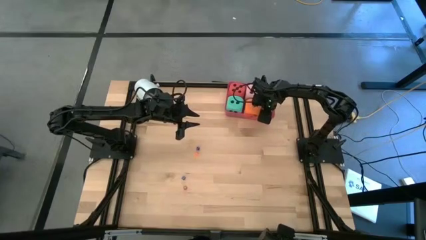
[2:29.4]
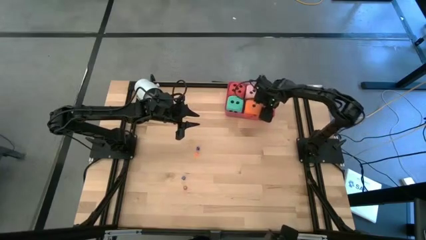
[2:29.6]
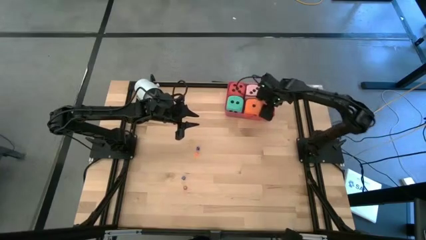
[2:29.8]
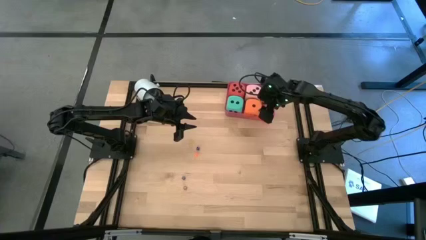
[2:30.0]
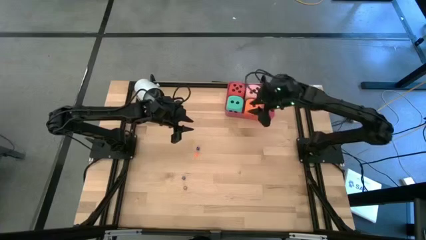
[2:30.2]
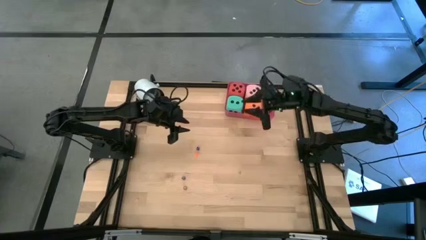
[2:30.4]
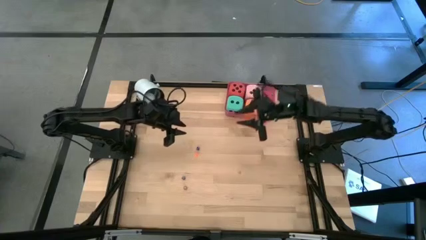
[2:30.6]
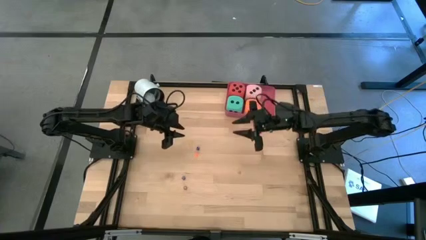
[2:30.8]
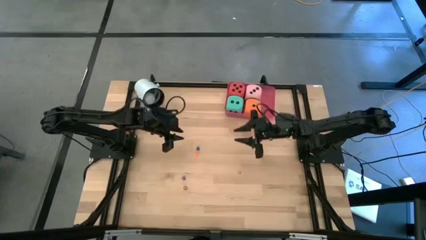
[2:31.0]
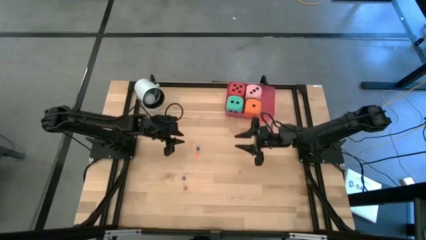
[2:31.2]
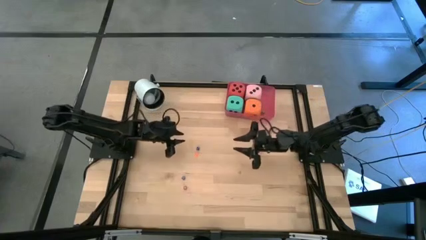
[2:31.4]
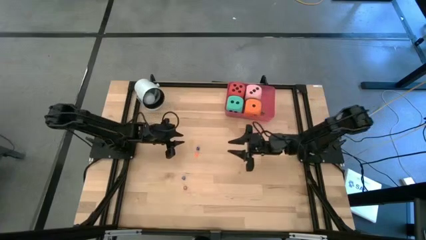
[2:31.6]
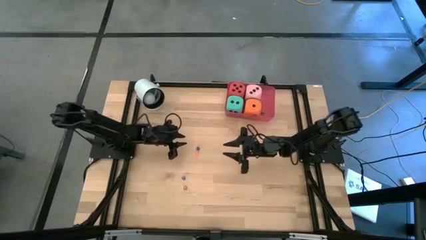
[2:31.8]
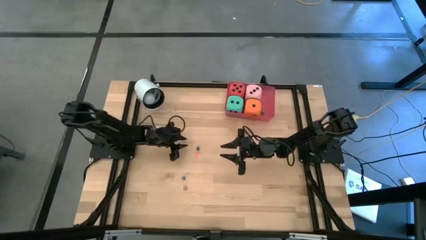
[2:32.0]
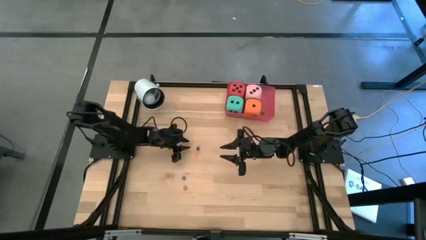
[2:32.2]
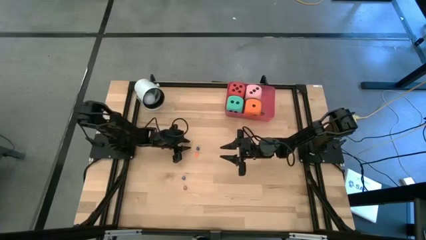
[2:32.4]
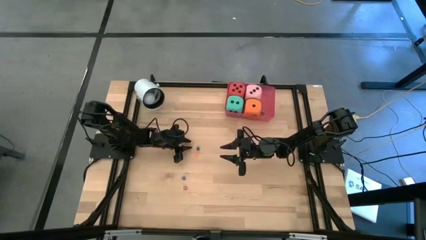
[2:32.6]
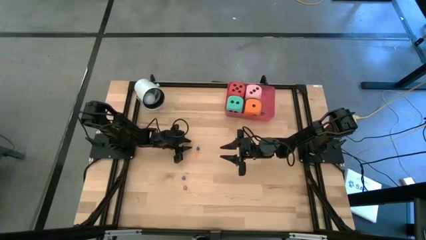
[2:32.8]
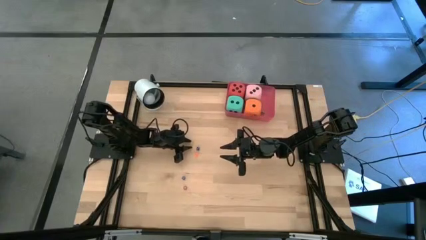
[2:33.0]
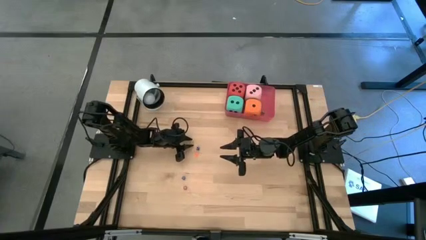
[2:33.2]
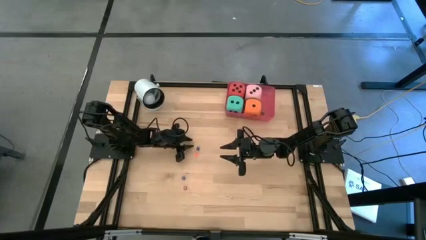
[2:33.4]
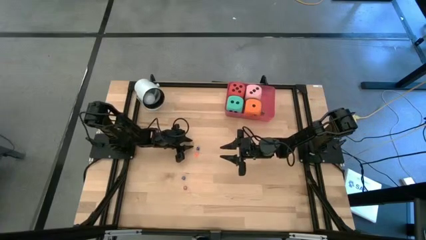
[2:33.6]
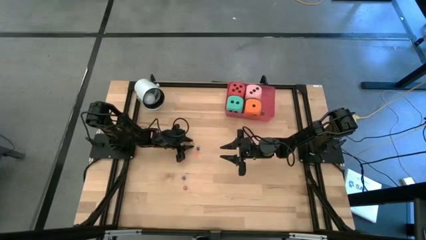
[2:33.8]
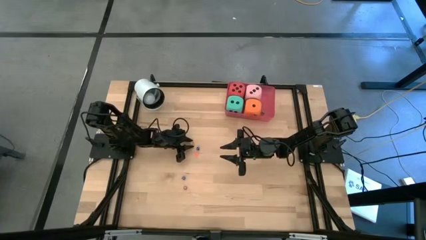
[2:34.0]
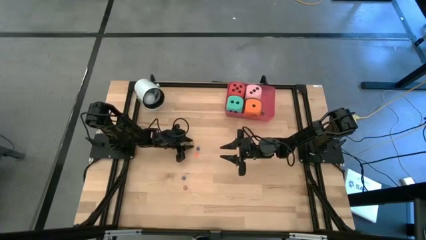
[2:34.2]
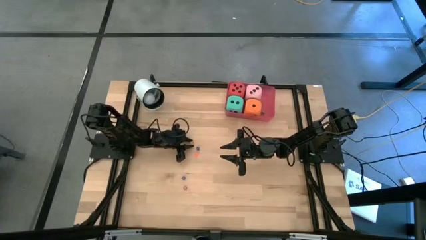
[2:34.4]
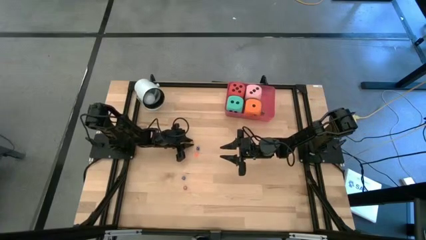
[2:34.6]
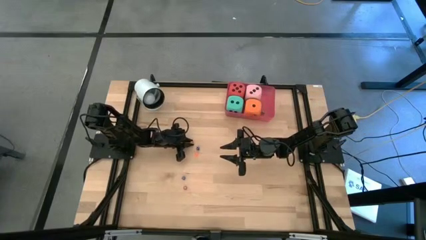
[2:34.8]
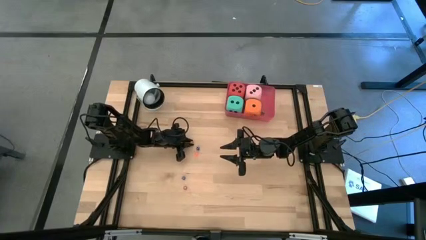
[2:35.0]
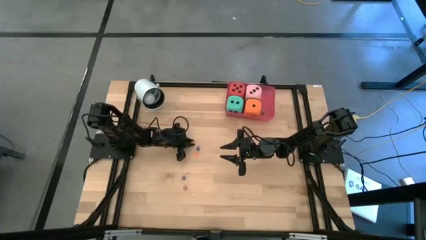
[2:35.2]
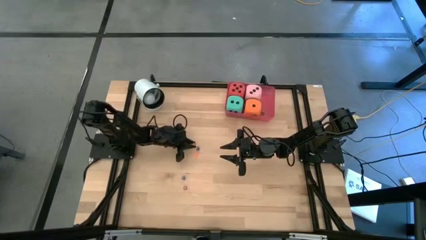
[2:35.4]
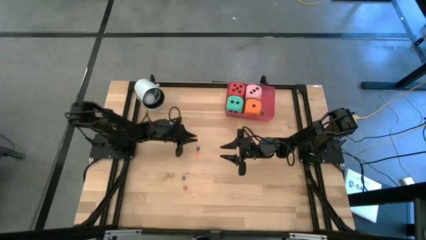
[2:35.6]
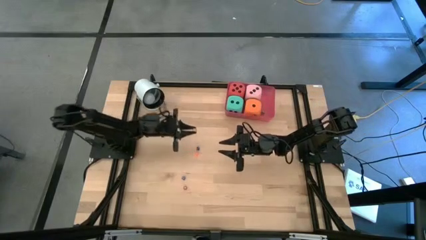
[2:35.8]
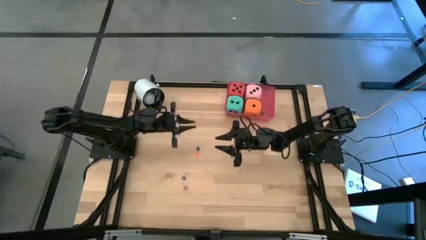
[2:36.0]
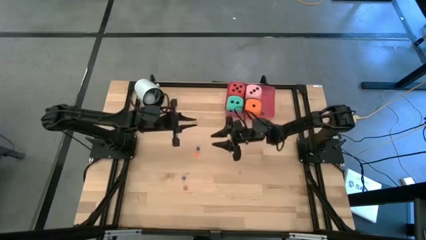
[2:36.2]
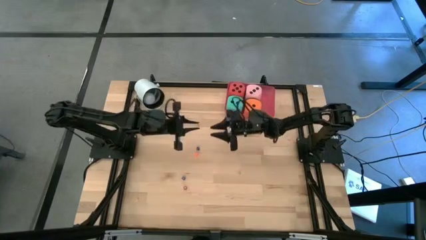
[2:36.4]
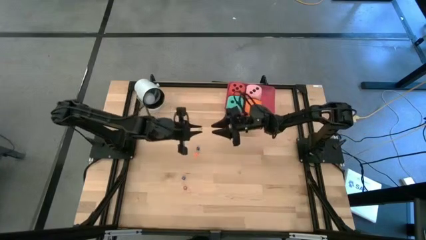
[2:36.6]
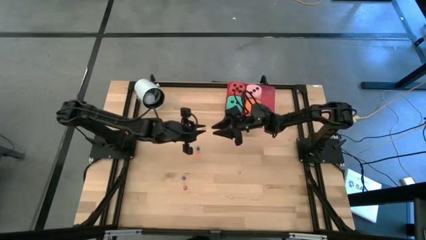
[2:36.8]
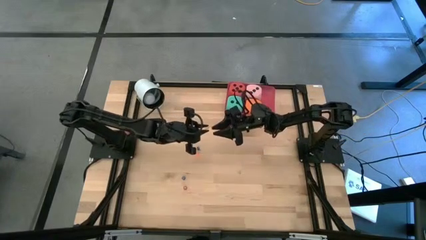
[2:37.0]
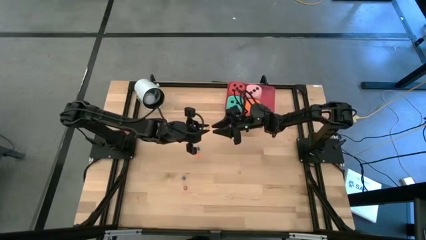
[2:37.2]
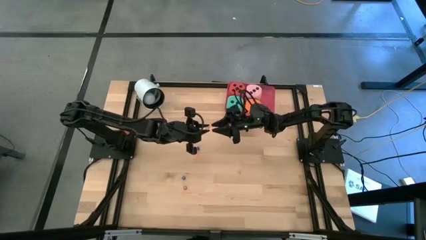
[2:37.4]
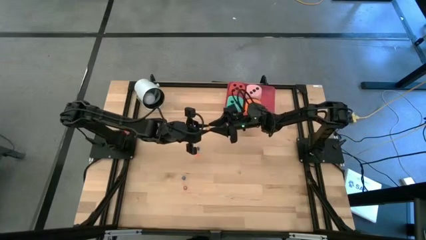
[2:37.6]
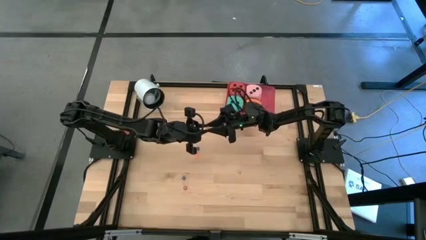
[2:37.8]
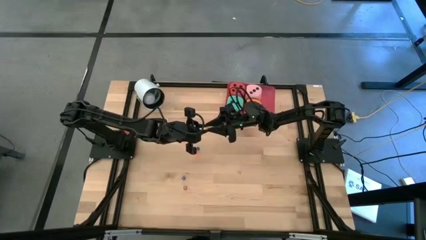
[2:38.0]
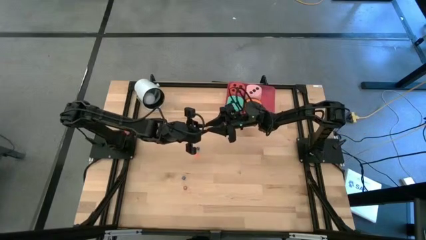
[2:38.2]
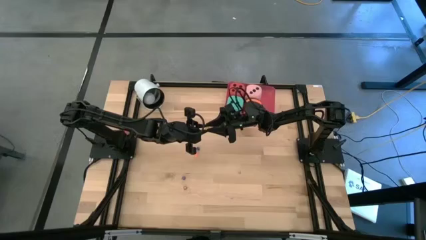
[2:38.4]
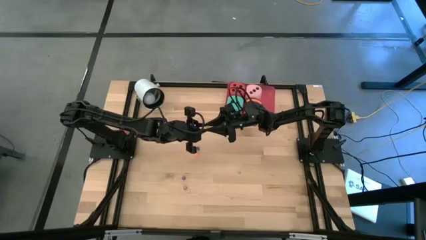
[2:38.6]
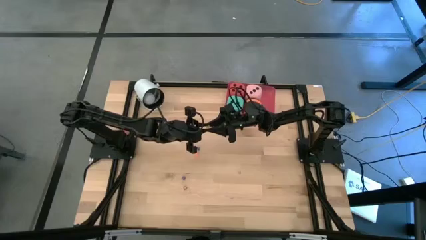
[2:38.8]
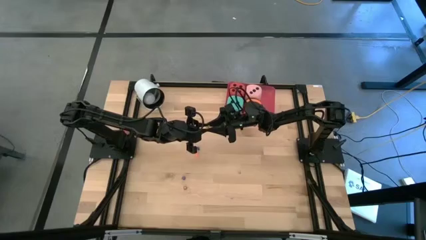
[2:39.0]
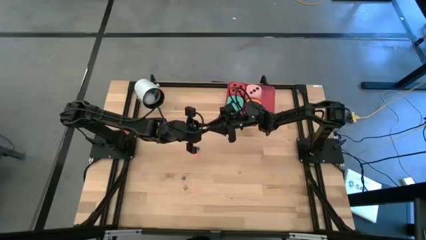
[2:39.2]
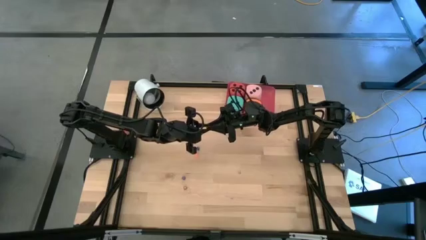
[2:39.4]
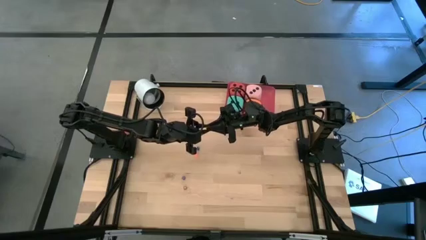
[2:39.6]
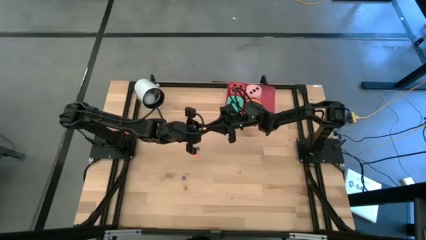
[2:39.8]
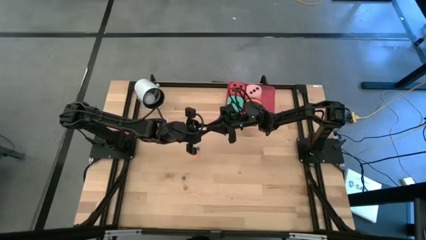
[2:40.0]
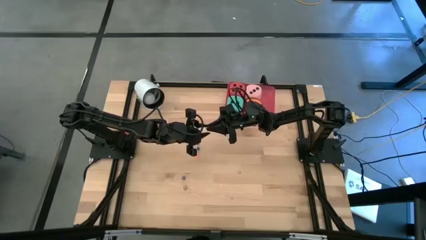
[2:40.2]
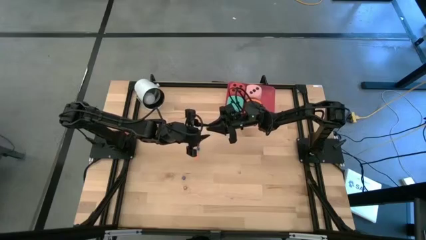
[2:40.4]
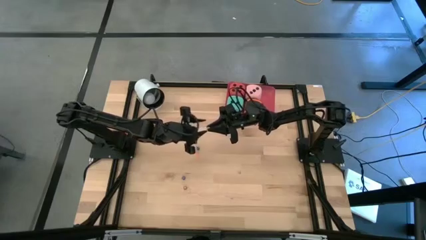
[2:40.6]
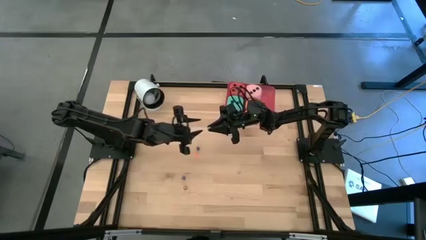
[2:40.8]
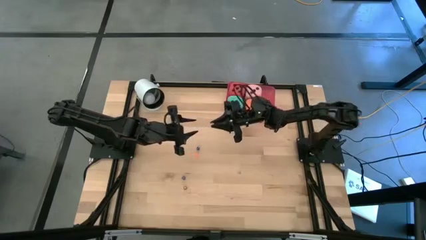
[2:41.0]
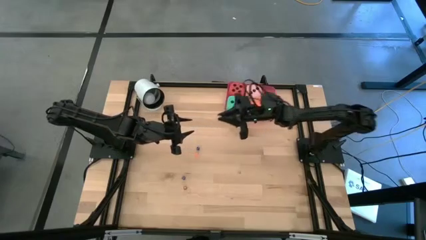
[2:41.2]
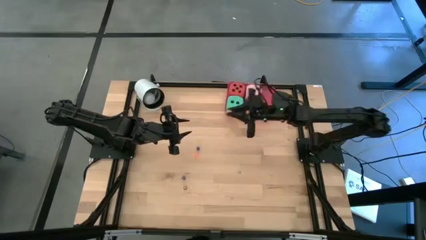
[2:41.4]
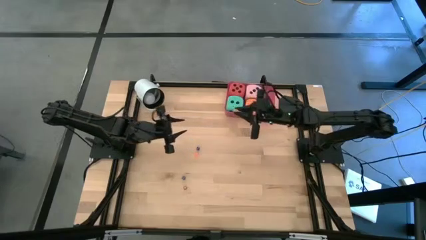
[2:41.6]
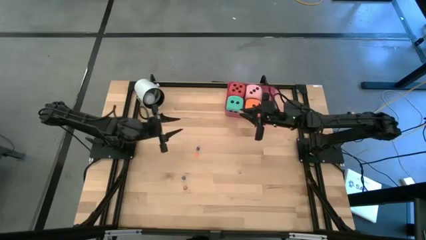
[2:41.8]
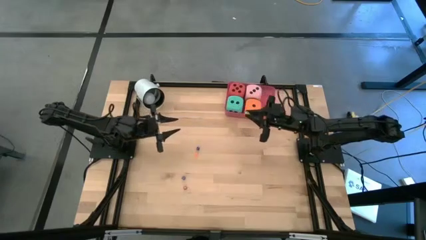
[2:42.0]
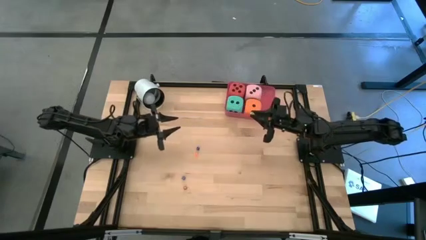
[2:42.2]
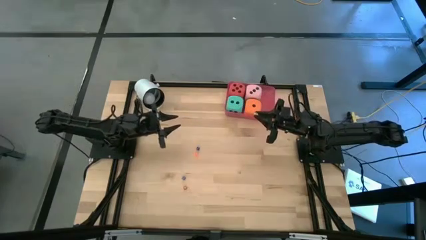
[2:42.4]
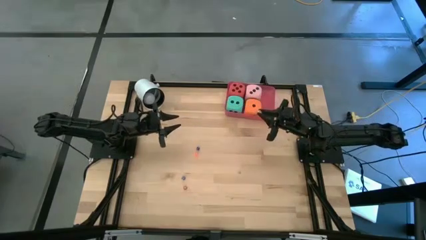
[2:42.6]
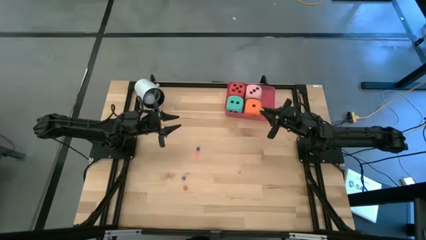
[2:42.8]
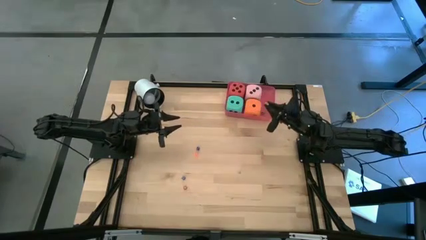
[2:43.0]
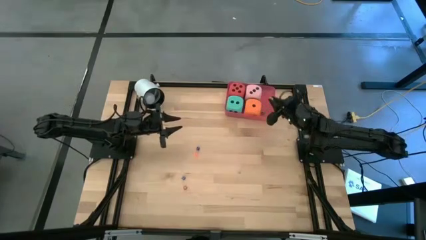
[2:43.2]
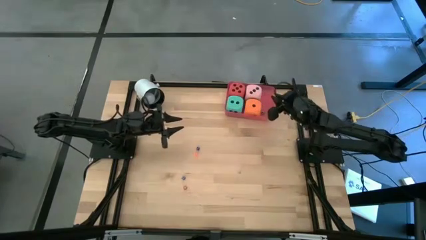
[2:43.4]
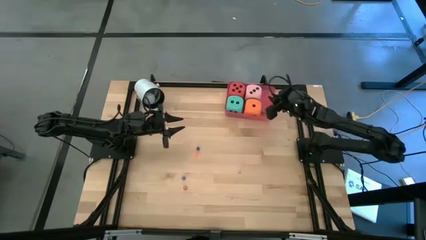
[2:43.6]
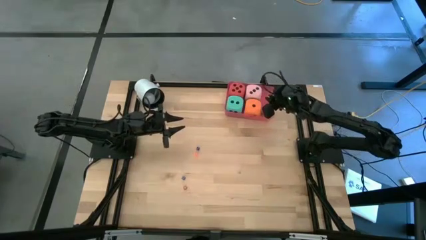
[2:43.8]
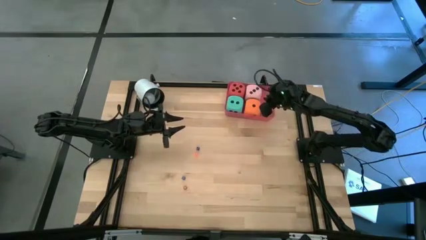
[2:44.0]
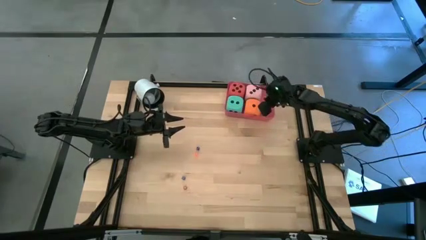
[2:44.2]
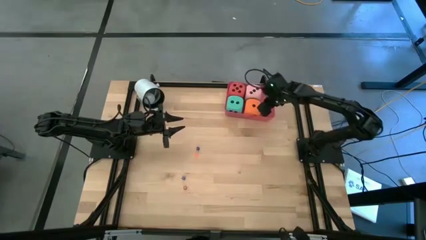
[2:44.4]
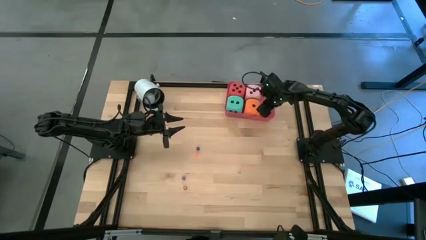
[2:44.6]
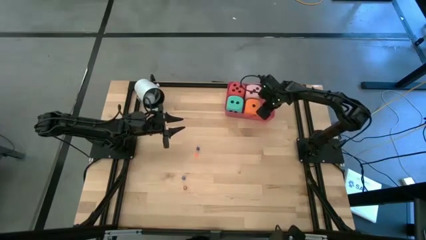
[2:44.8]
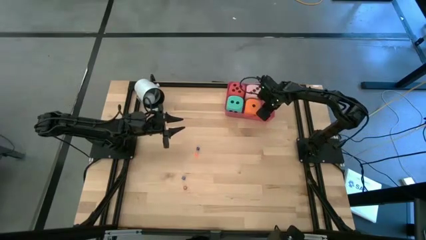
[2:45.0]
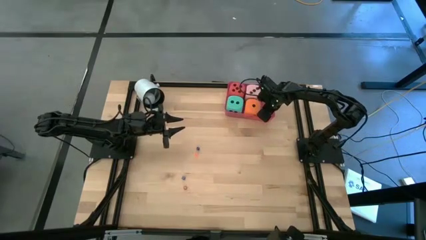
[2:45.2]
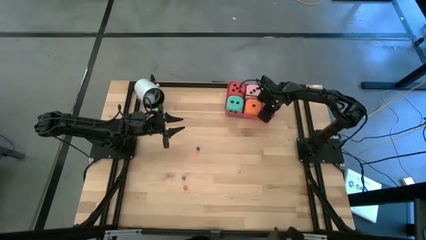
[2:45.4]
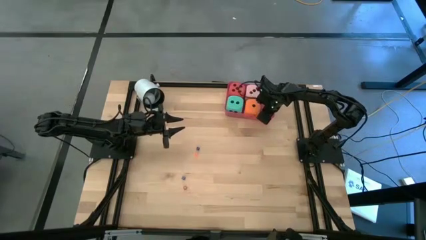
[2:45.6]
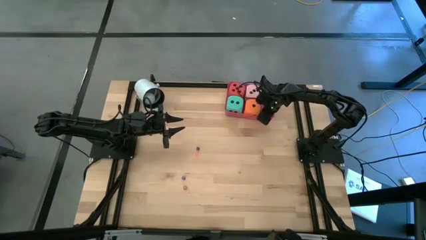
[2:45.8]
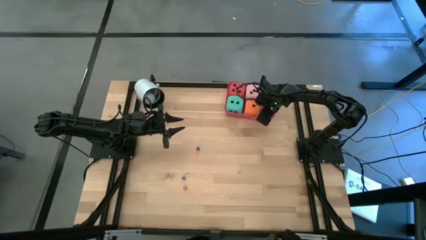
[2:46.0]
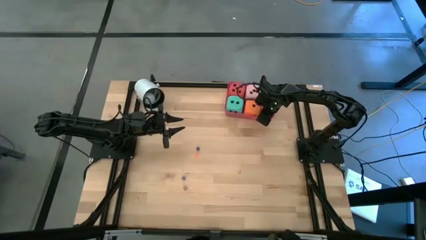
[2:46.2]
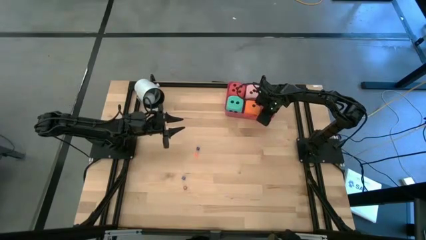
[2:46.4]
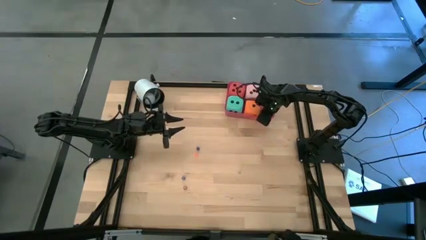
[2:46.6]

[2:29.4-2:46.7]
Task: Pick & Place Dice
Put the small yellow dice into the red bin
